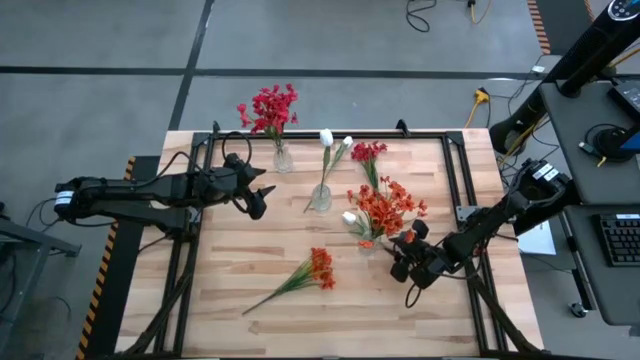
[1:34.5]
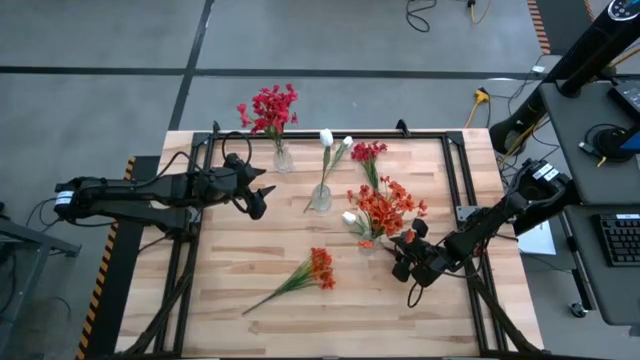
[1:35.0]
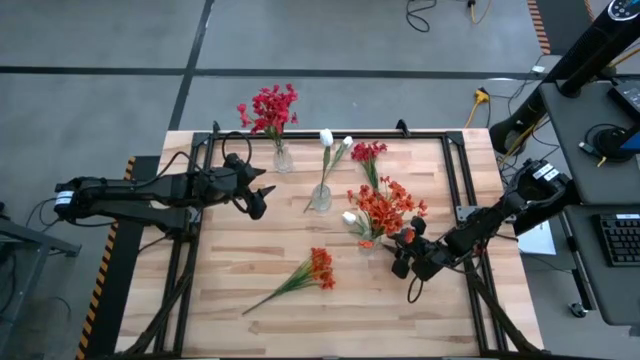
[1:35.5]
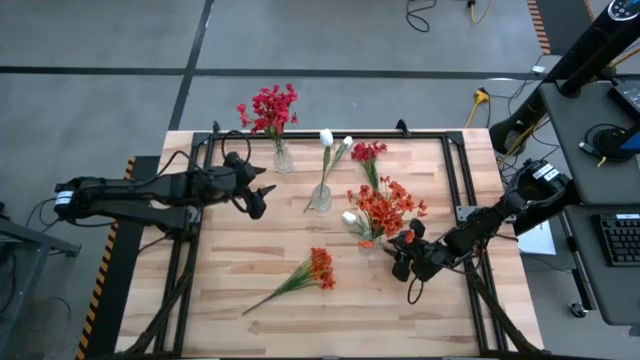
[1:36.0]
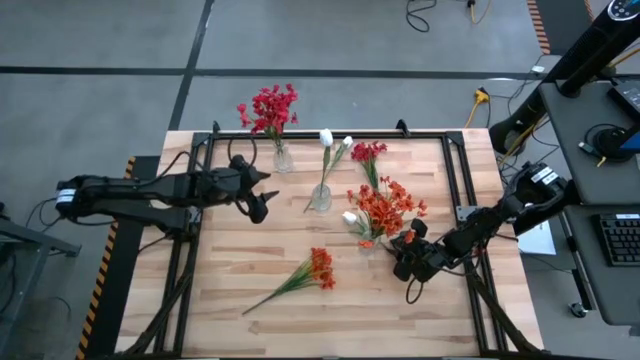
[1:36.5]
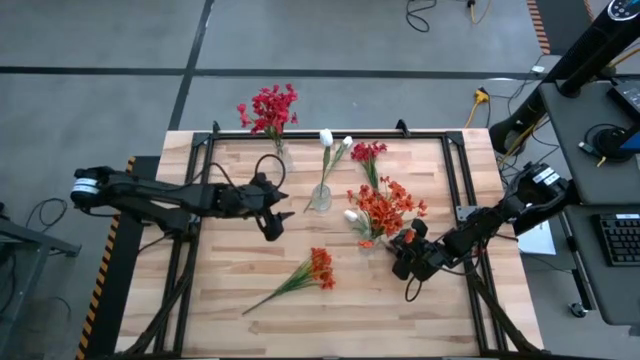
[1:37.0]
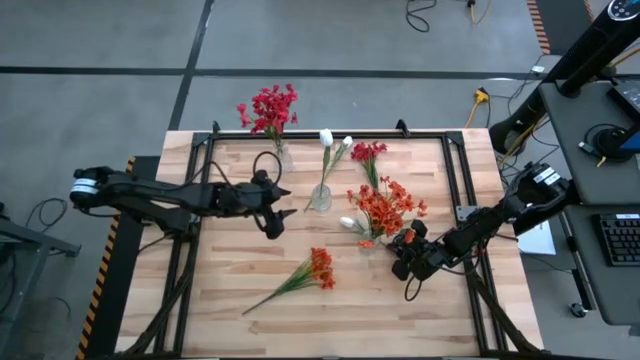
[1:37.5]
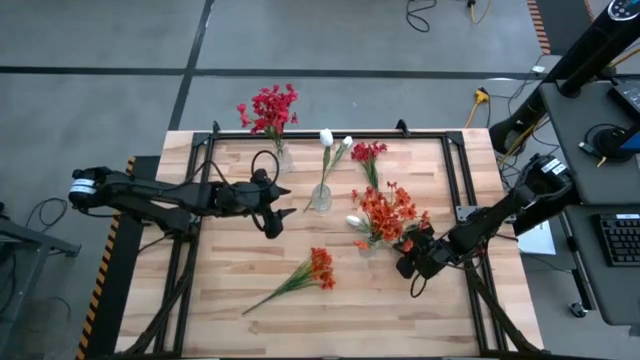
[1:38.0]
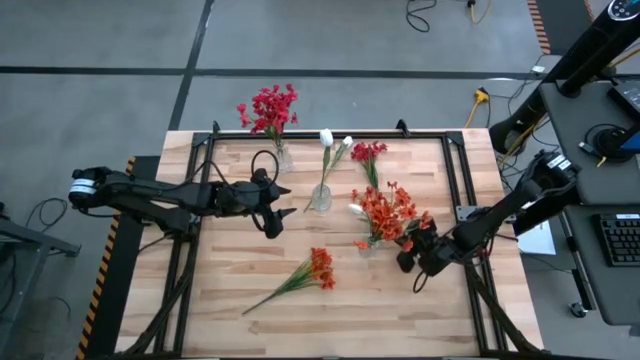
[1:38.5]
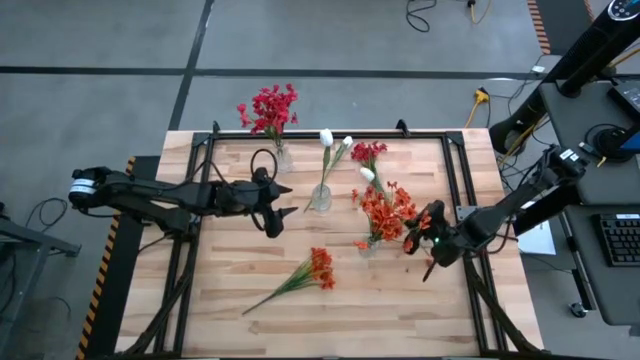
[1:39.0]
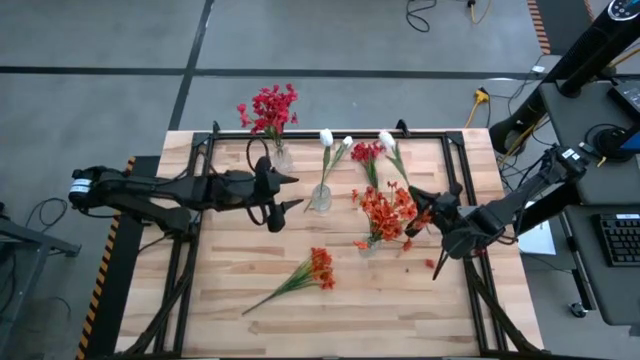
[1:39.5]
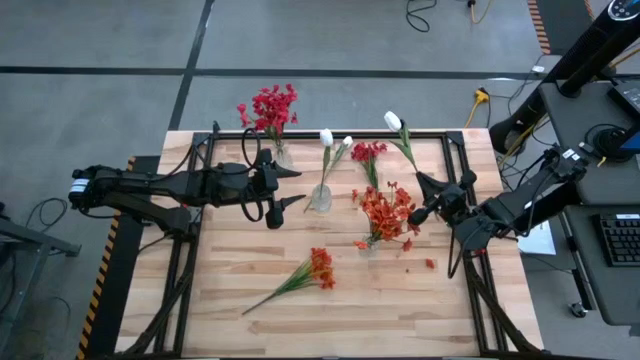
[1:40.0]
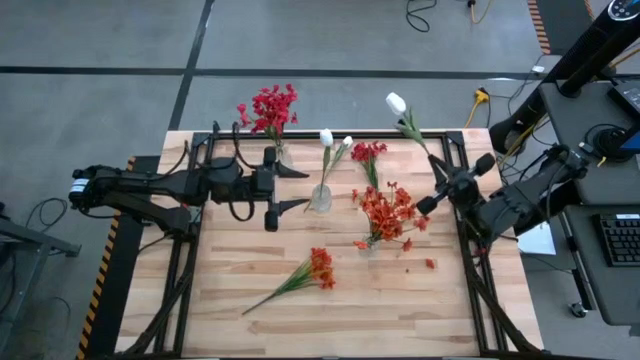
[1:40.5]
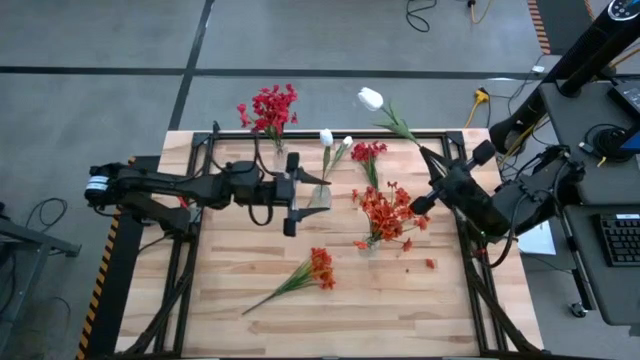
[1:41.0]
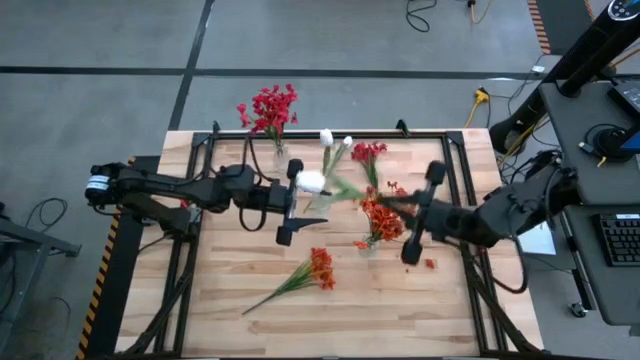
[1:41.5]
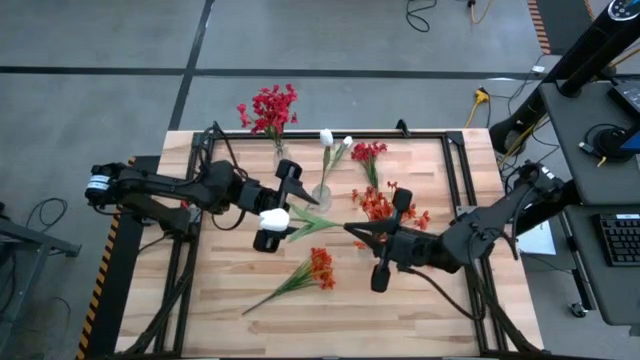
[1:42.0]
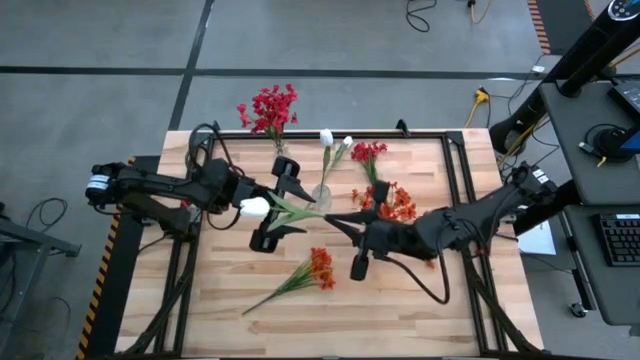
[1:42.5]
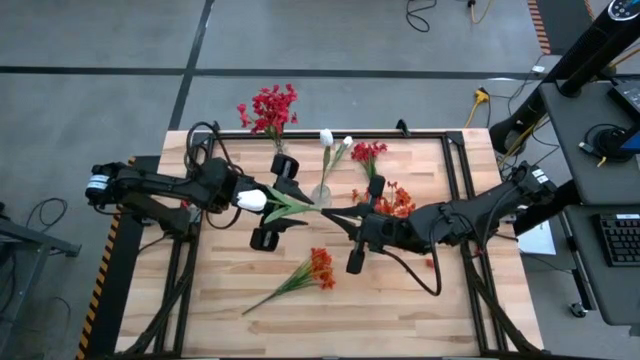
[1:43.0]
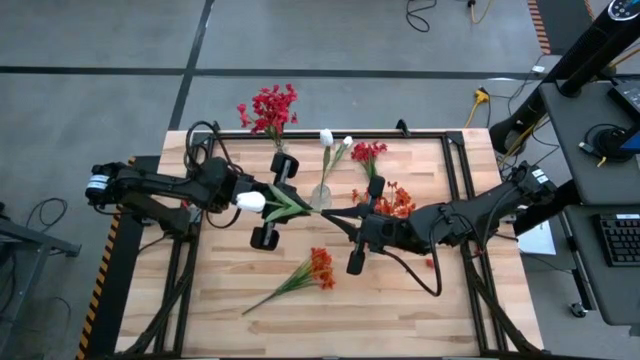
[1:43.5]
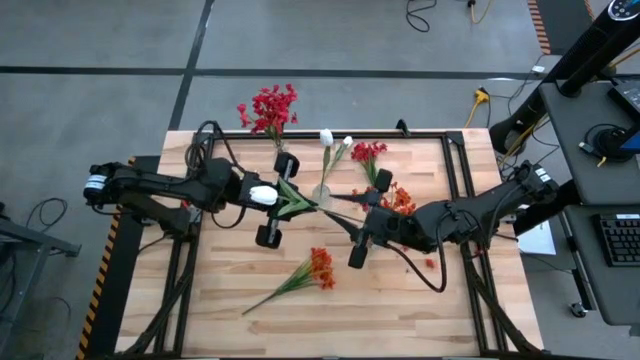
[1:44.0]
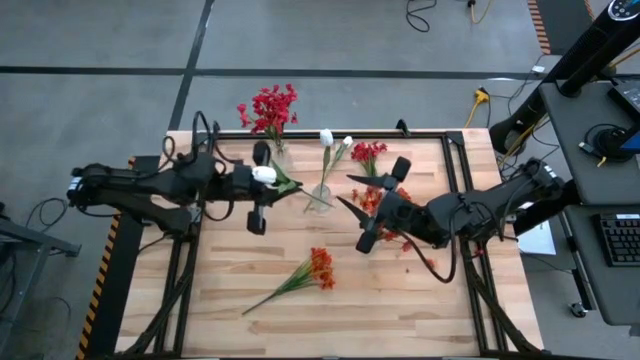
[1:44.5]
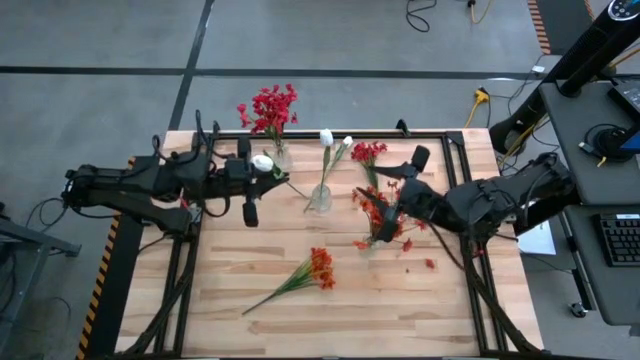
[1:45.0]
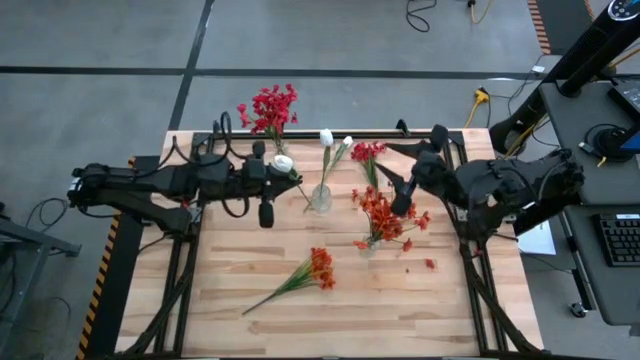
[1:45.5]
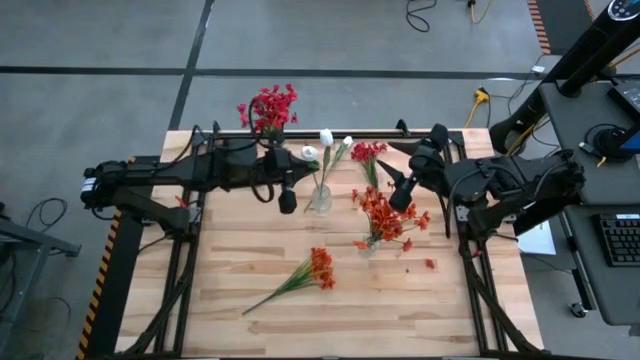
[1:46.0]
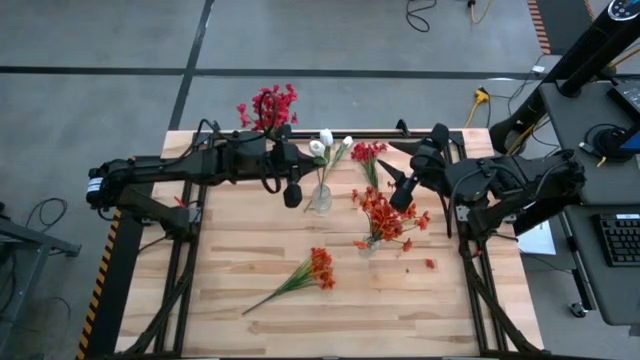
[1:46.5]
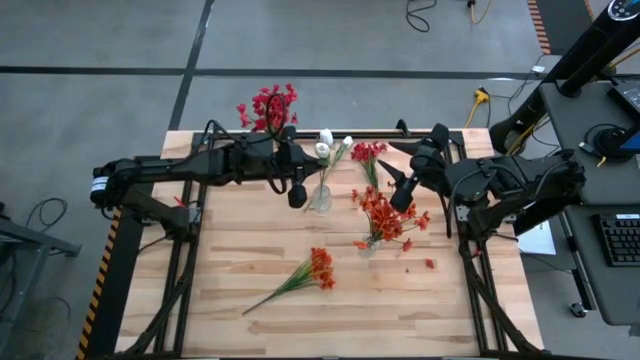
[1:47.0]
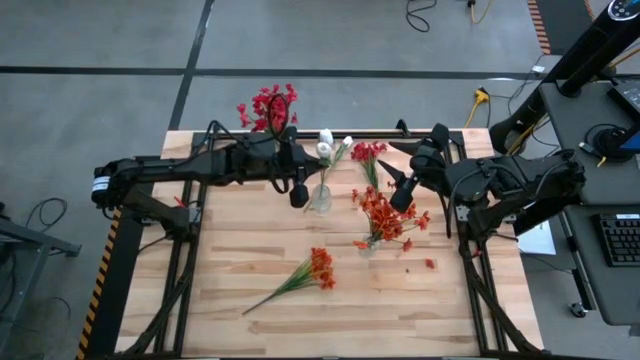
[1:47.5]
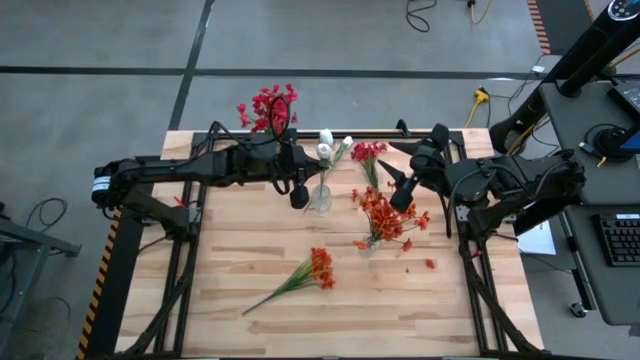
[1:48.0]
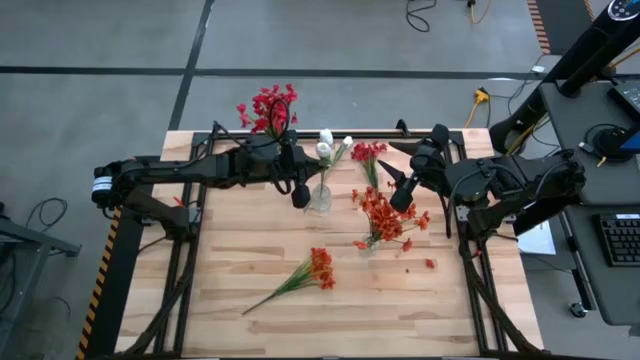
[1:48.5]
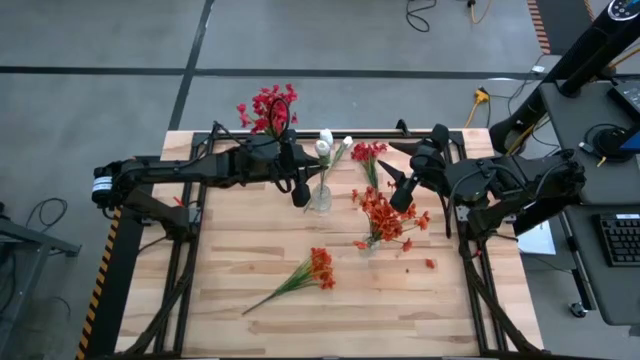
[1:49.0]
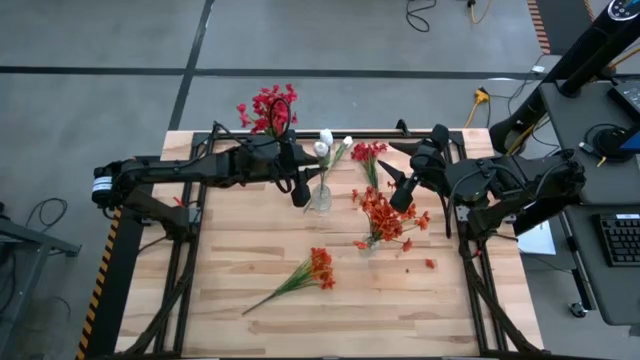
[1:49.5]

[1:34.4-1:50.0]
Task: Sort flowers into vase by color
Put the right white tulip flower into the center transparent glass vase

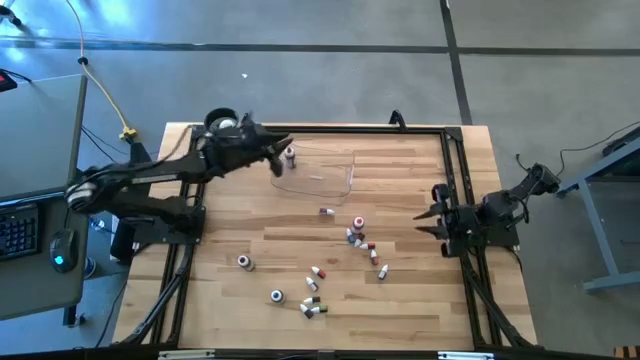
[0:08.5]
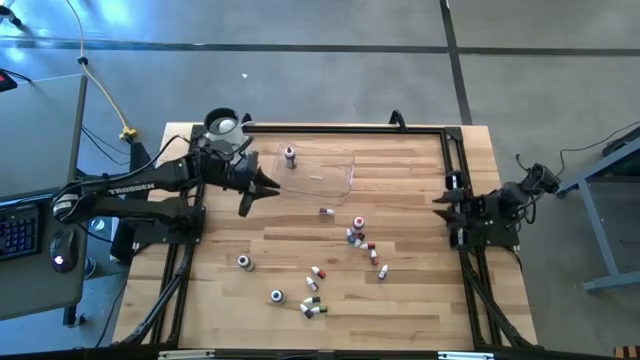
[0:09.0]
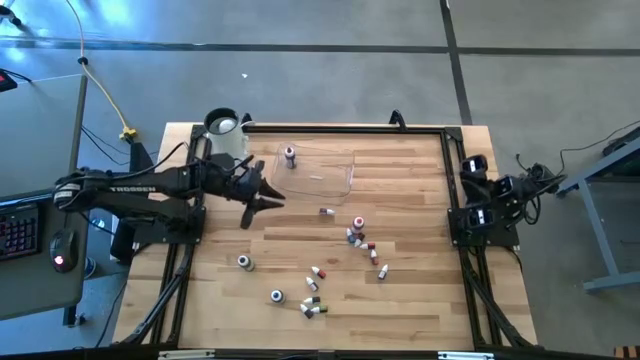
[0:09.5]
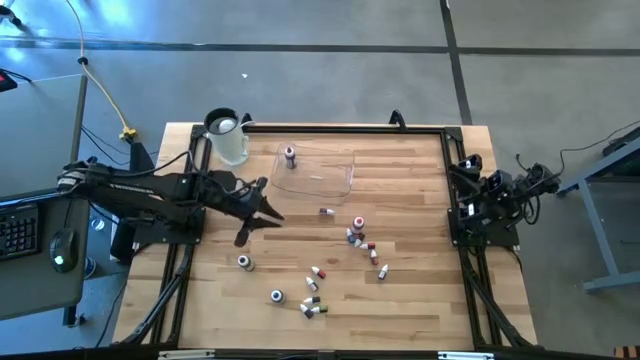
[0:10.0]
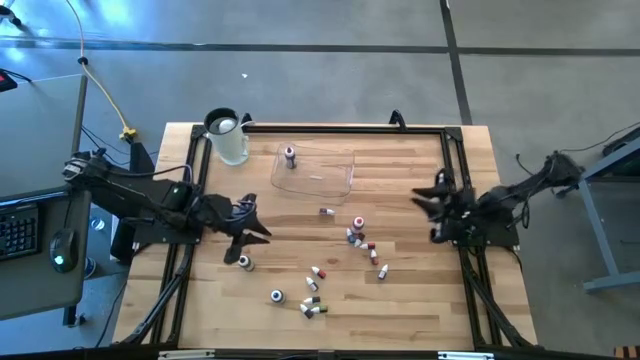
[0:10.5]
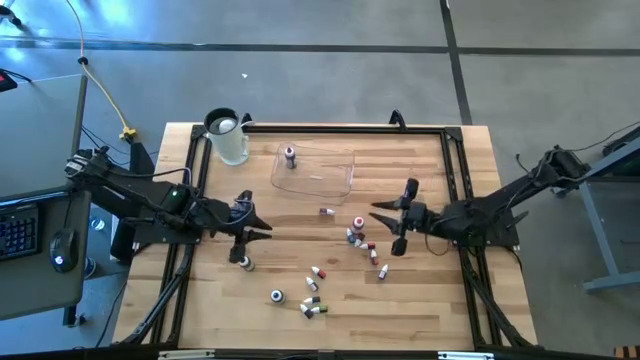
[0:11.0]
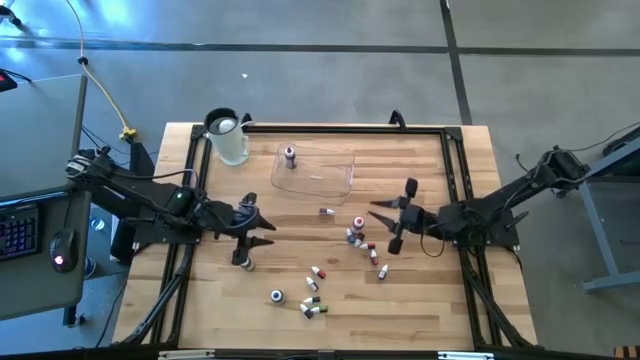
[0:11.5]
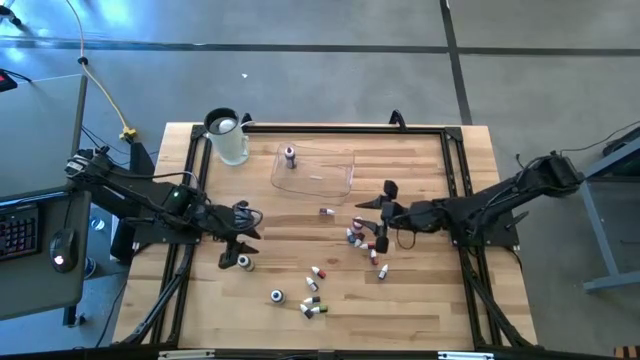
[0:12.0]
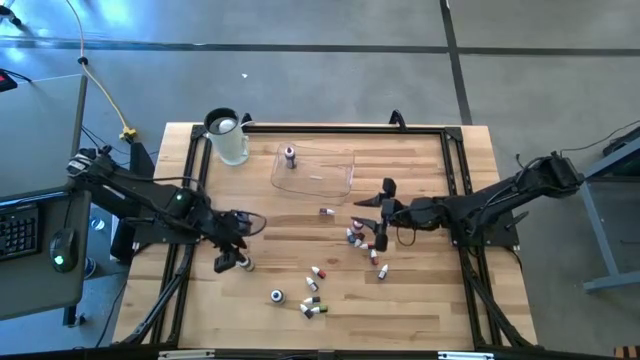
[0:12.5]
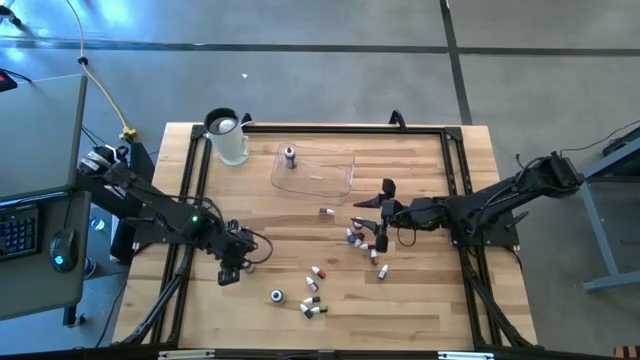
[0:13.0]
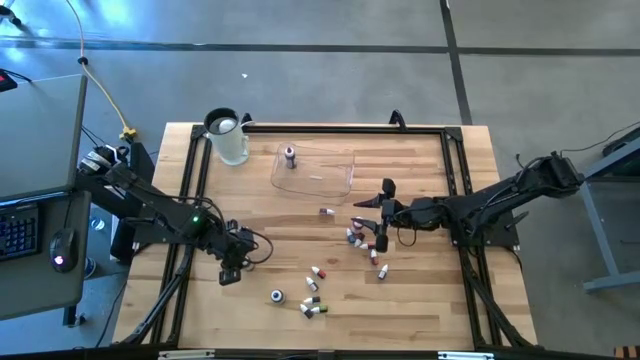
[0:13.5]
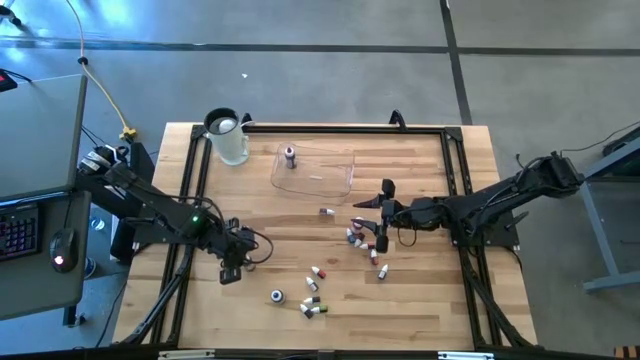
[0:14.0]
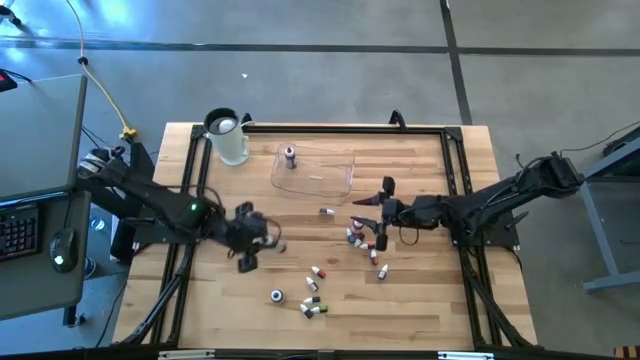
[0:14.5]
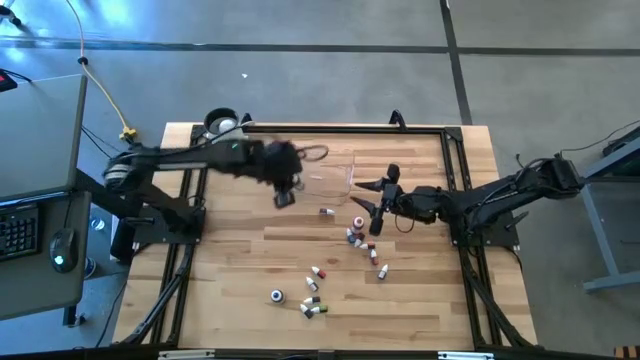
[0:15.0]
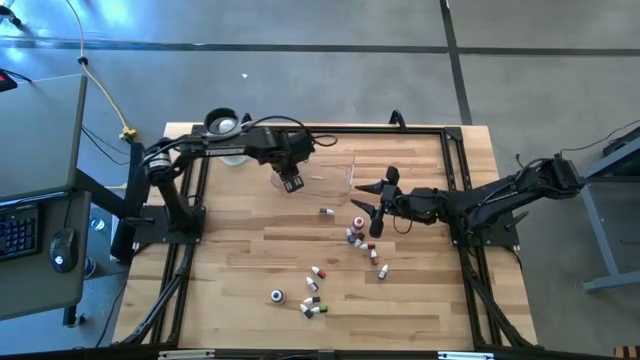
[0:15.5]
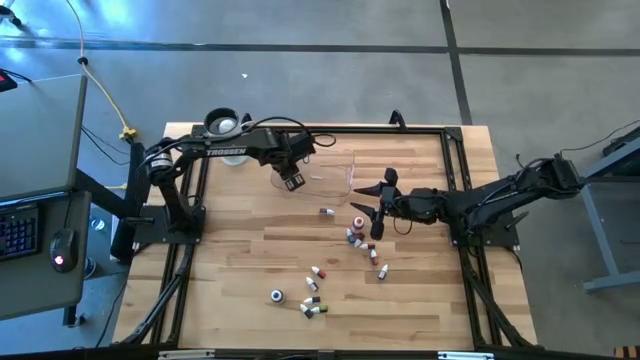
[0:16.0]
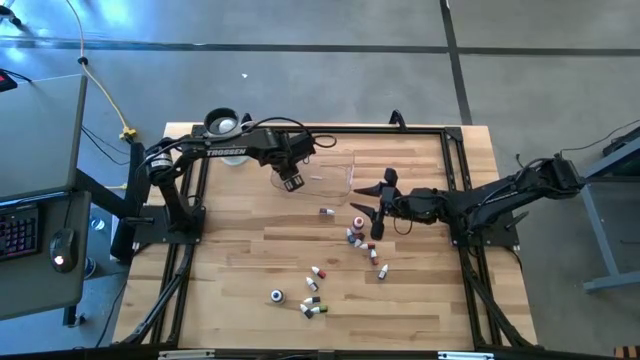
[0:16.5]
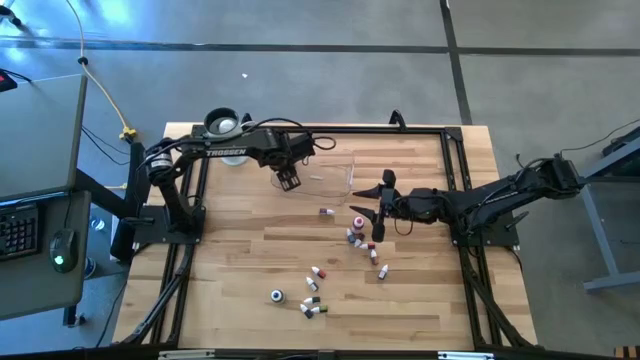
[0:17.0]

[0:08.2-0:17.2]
Task: Pick & Place food coloring
Put the large black food coloring bottle into the bin
